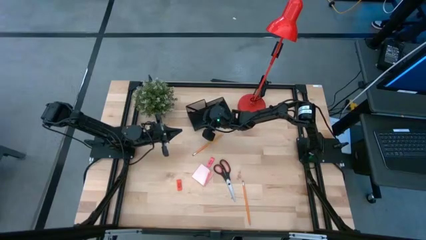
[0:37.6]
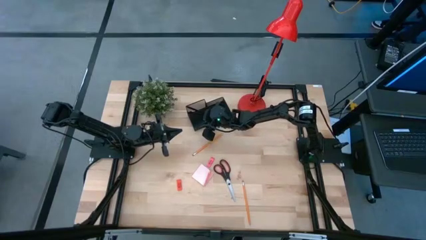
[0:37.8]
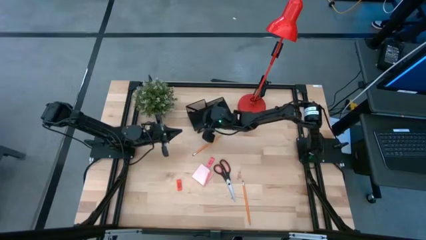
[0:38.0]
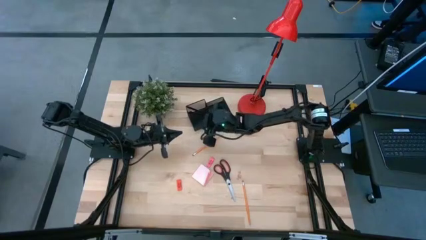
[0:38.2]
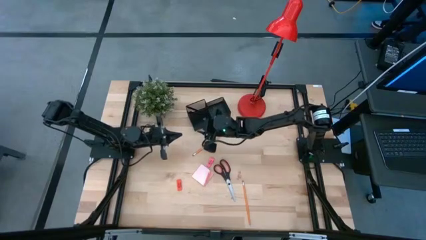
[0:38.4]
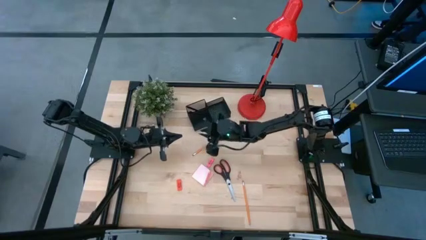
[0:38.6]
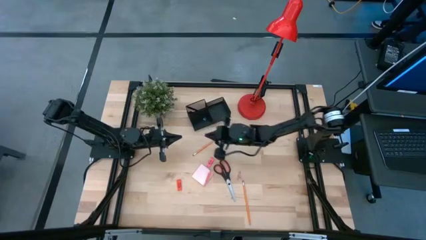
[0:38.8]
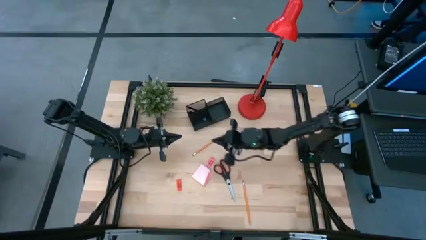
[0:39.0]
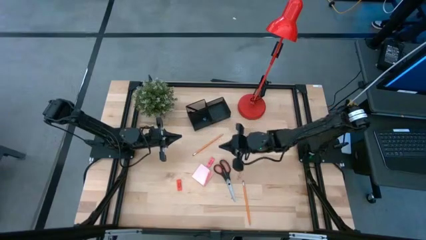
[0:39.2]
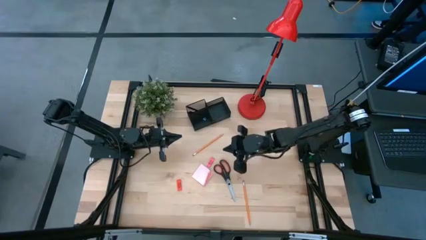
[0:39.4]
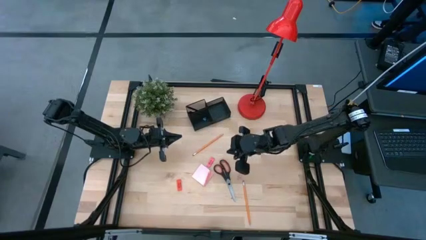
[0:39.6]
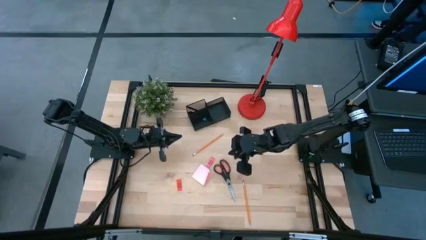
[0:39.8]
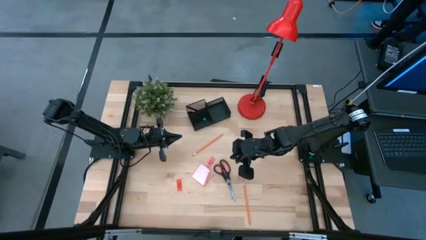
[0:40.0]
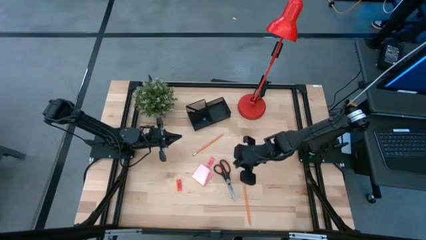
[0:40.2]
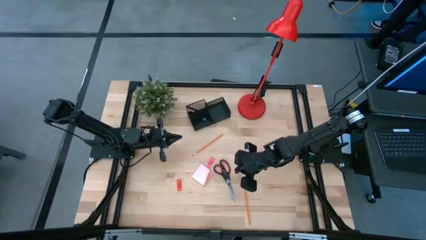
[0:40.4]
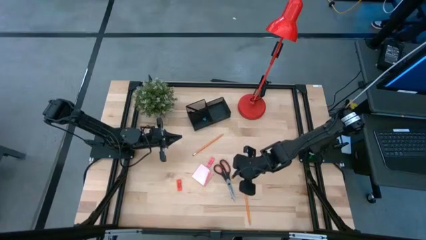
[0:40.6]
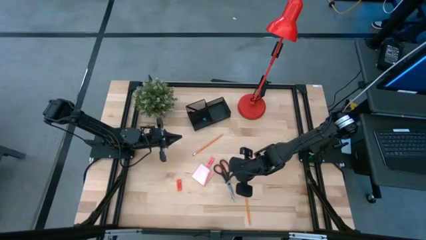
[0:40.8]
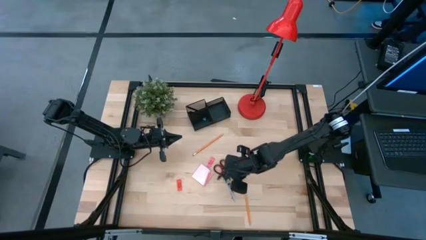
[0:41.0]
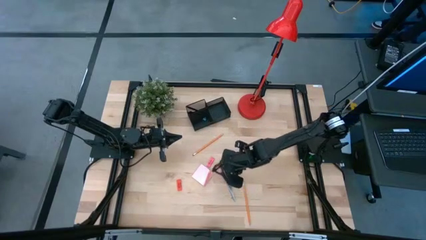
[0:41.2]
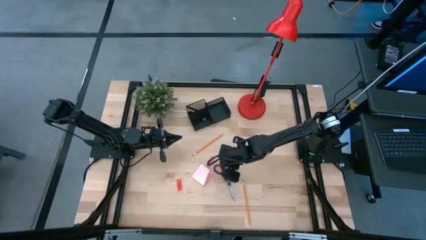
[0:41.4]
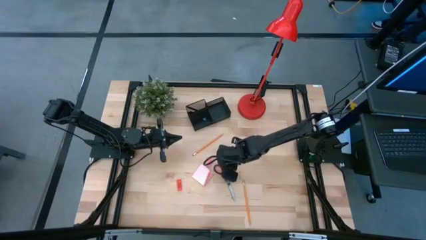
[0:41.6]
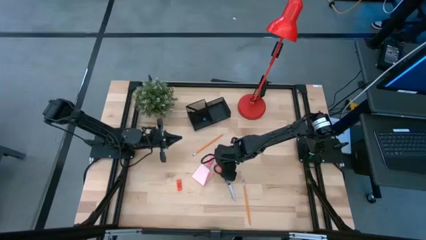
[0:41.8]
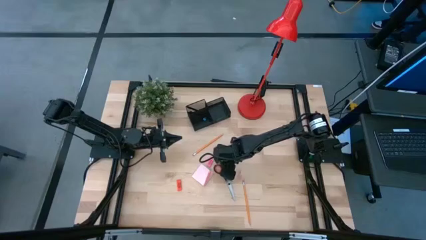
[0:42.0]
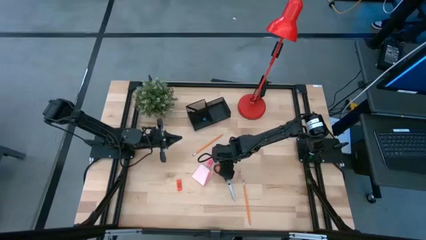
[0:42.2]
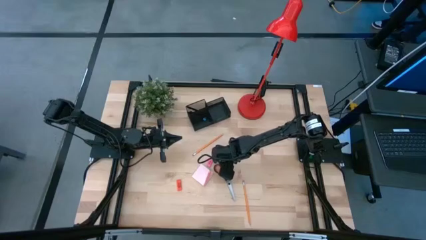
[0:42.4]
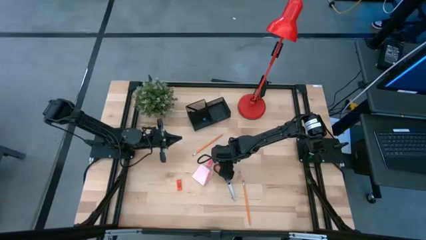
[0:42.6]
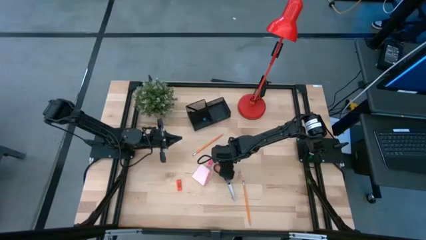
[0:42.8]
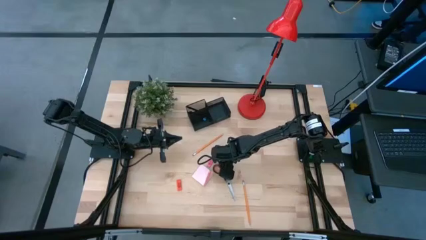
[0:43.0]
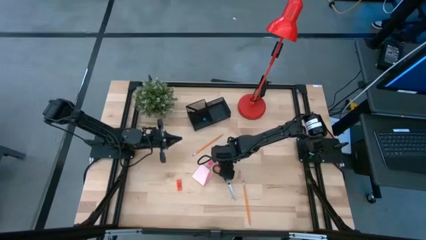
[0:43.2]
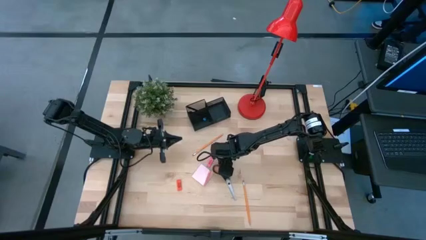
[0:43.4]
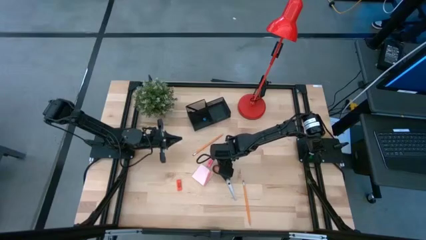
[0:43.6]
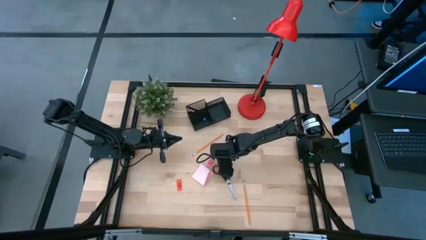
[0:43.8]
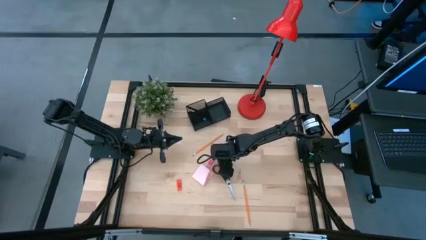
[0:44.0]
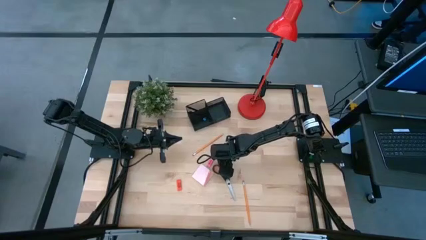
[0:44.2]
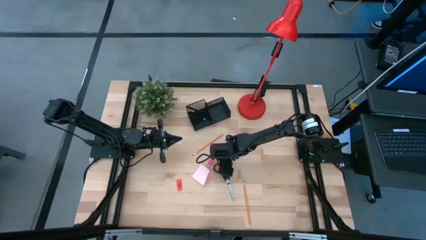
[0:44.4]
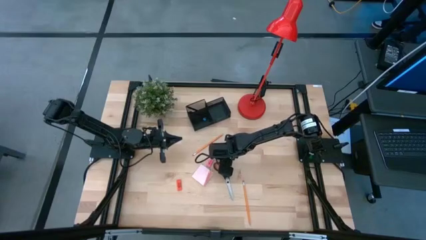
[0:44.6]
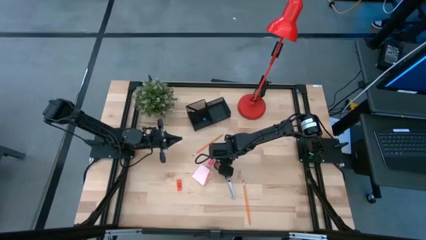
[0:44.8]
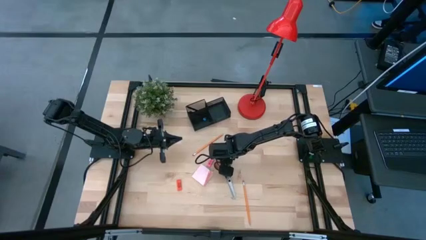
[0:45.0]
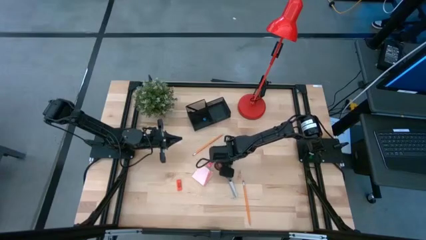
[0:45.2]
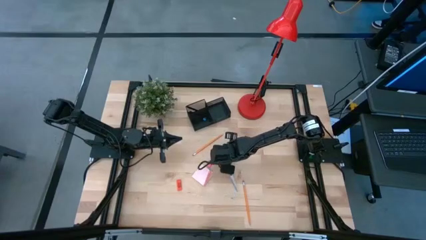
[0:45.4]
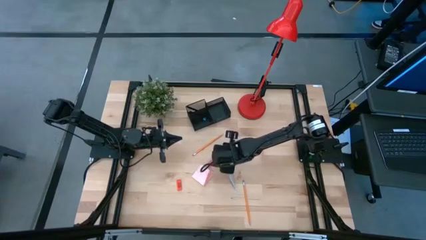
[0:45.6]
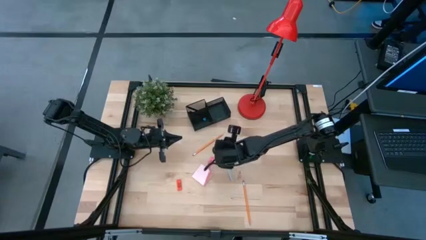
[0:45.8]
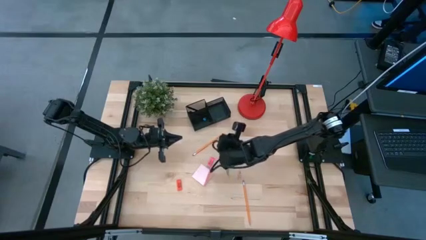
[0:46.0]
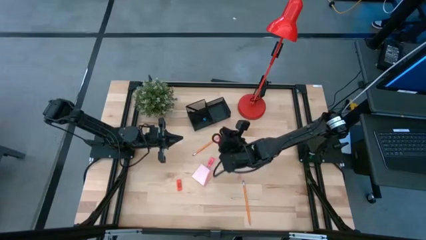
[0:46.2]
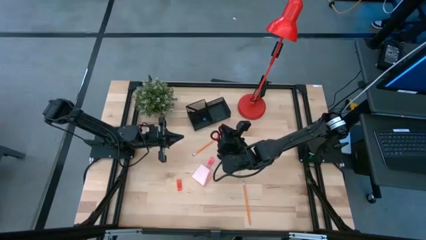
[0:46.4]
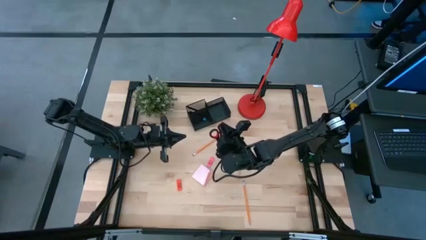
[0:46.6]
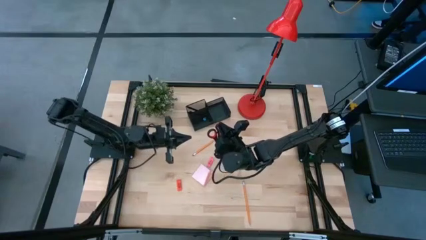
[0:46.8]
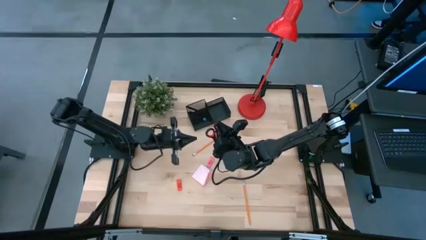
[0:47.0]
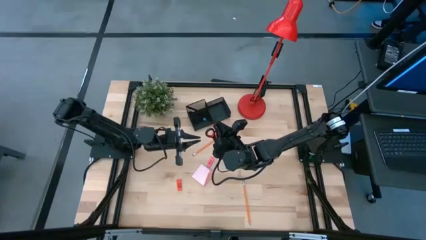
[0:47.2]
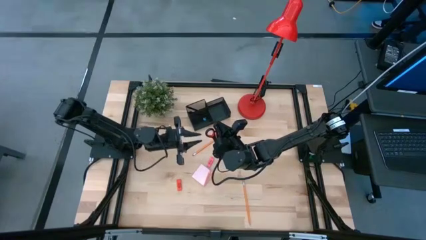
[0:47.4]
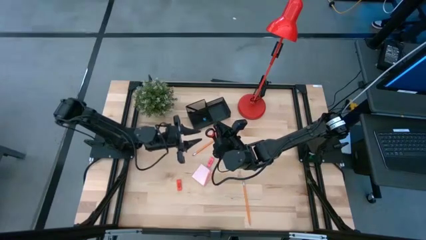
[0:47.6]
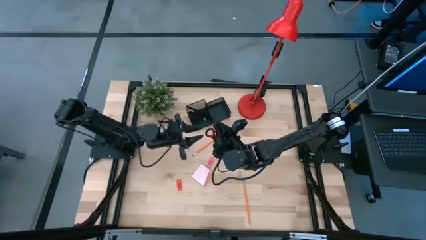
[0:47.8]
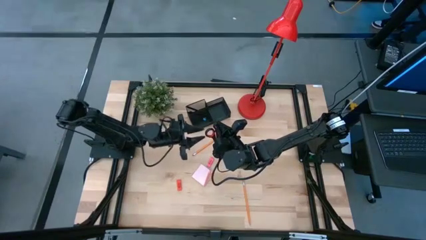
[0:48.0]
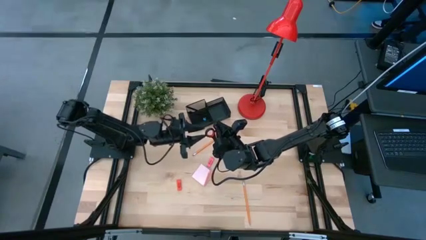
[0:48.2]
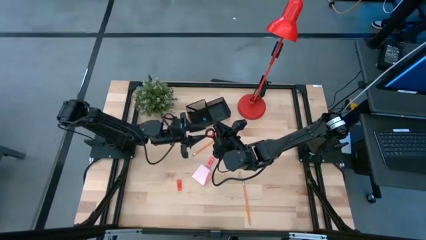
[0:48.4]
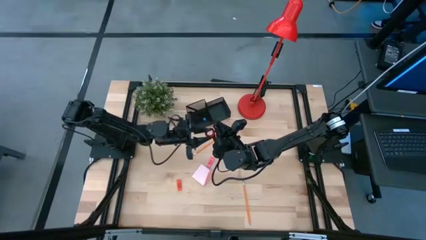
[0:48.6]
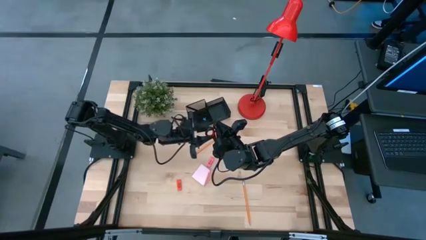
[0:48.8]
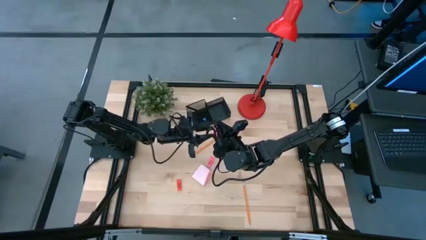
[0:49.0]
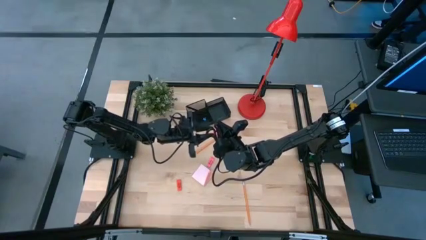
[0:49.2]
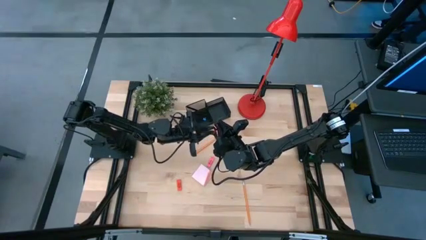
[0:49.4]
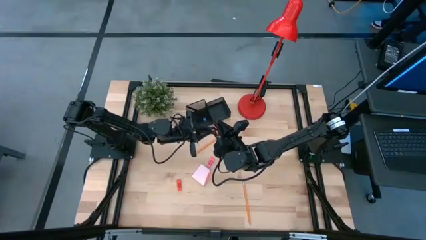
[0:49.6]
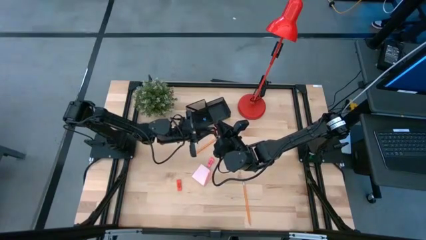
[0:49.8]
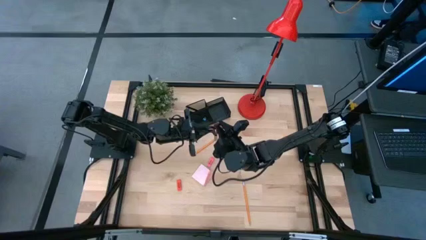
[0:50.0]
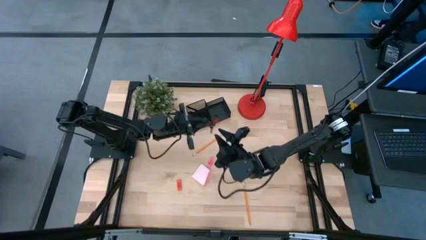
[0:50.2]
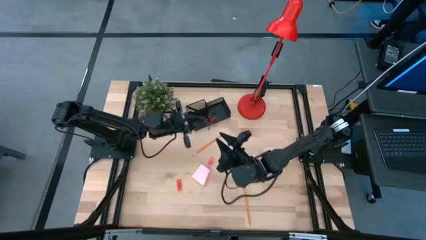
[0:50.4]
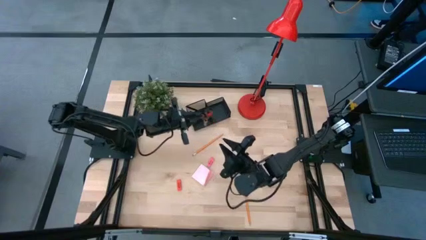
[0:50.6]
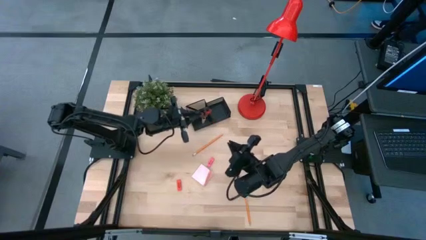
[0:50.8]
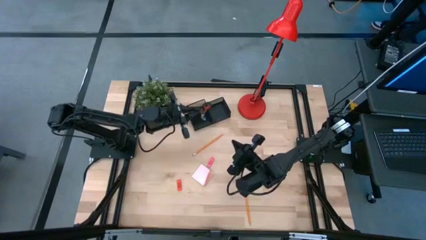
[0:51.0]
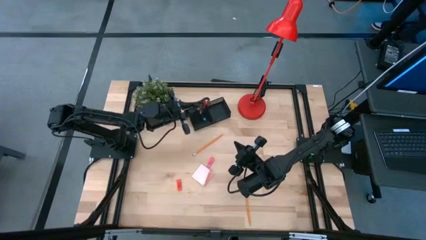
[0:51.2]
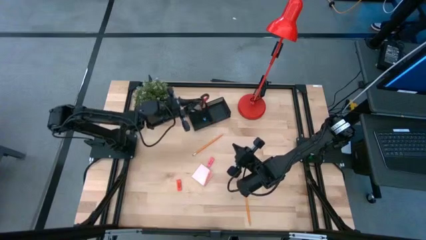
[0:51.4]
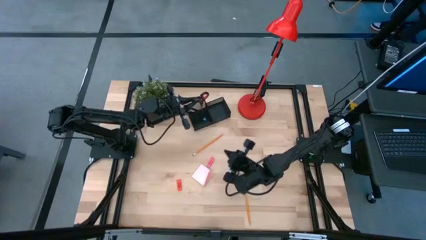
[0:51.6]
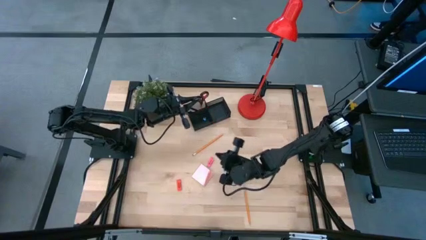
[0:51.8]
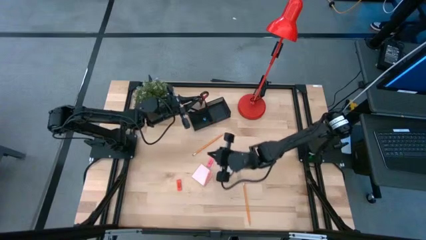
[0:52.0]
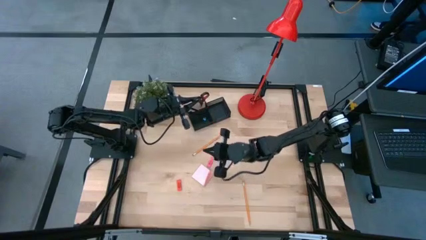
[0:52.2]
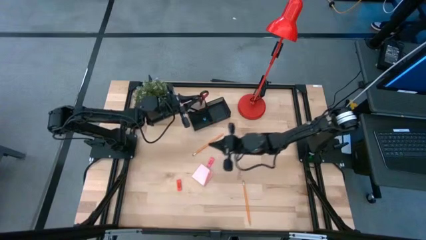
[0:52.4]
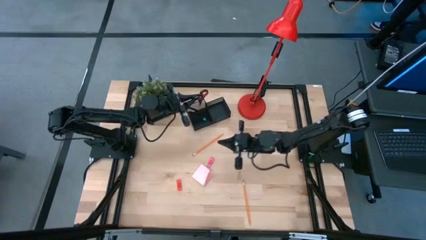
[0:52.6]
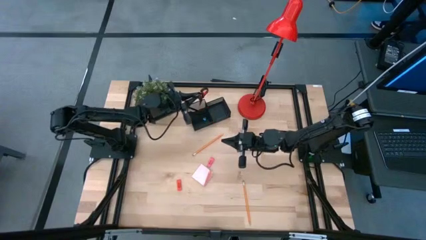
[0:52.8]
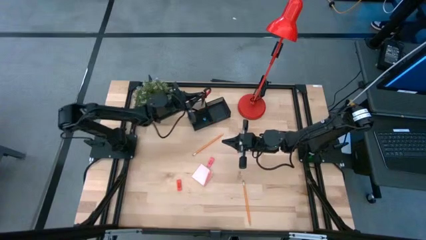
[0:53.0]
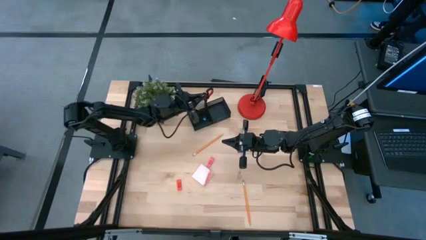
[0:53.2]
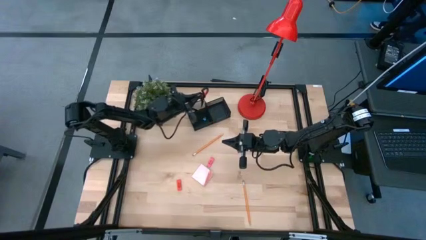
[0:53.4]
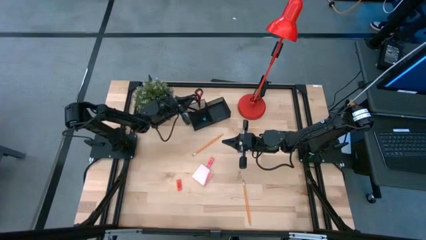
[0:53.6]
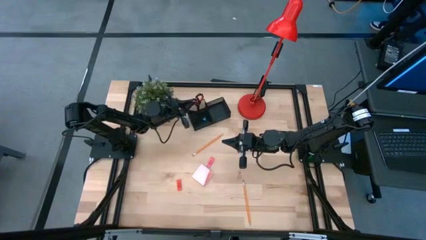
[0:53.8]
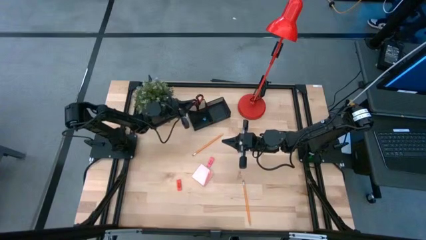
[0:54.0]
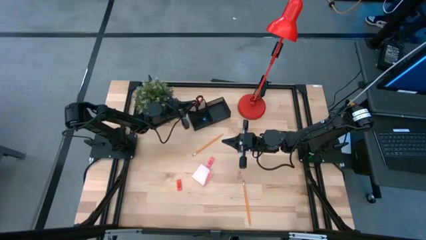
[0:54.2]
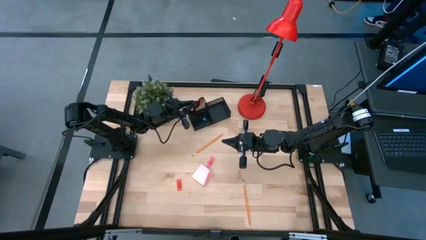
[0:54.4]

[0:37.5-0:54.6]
Task: Pick and place office supplies into organizer
Put the black scissors into the black desk organizer
